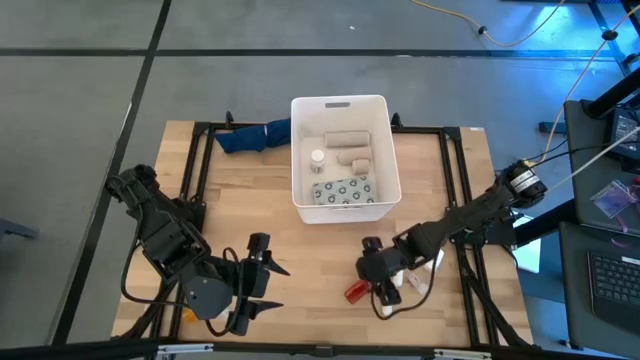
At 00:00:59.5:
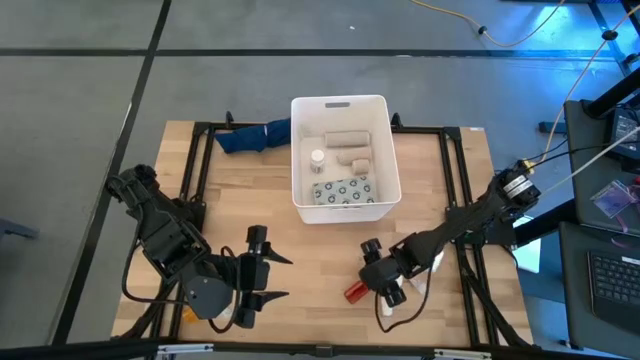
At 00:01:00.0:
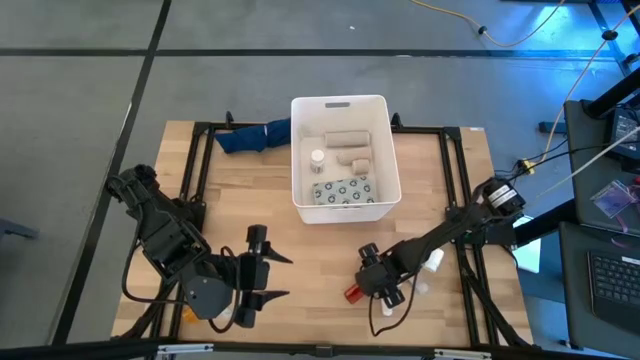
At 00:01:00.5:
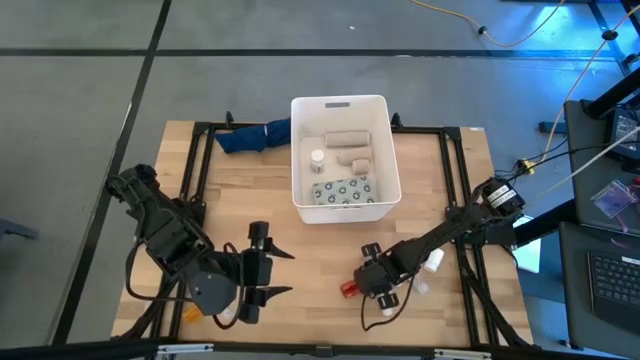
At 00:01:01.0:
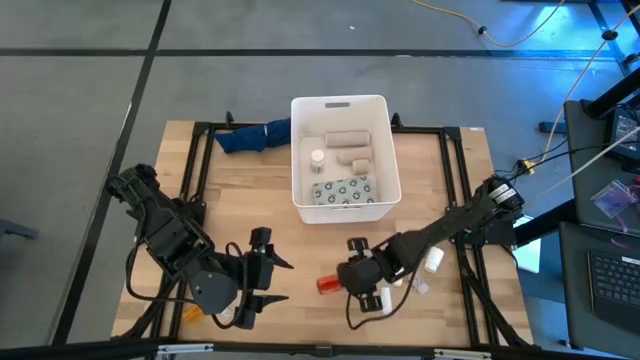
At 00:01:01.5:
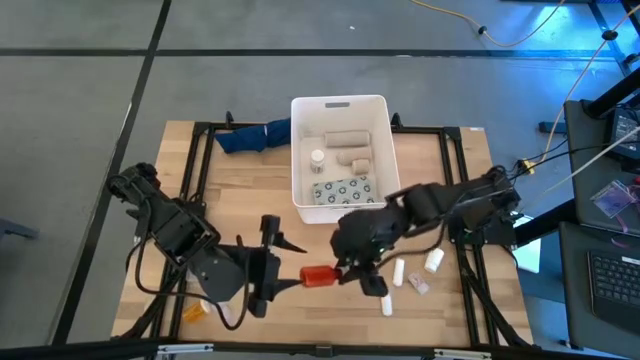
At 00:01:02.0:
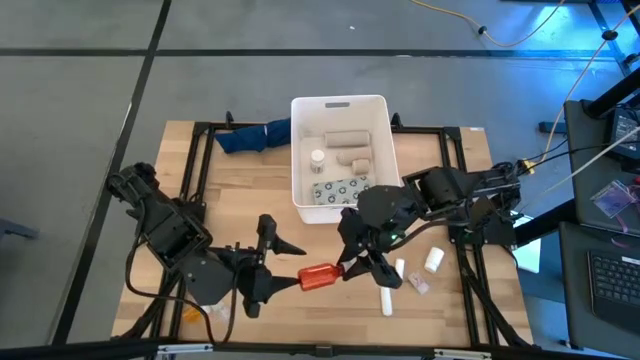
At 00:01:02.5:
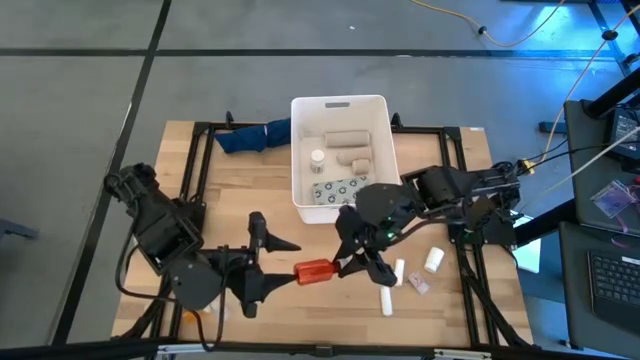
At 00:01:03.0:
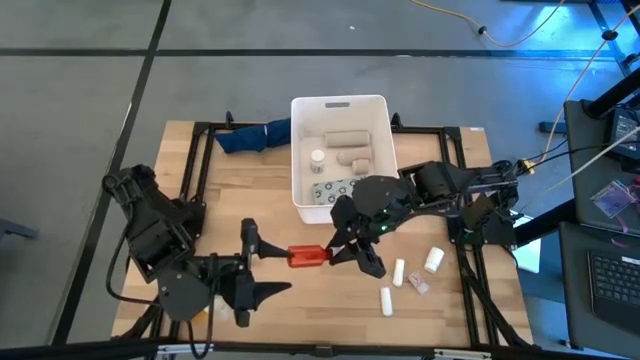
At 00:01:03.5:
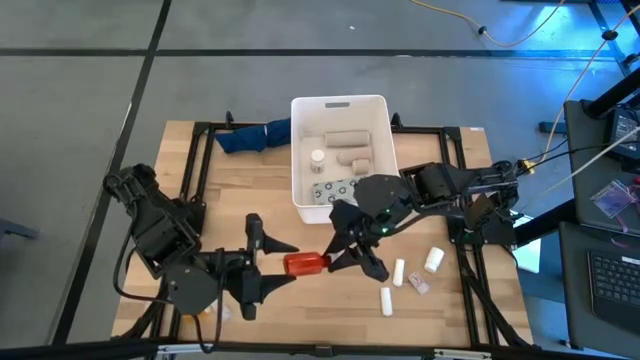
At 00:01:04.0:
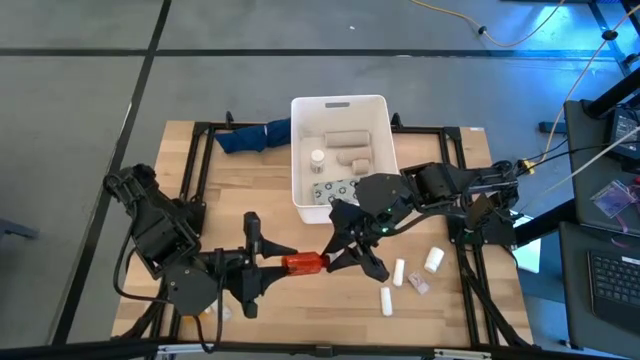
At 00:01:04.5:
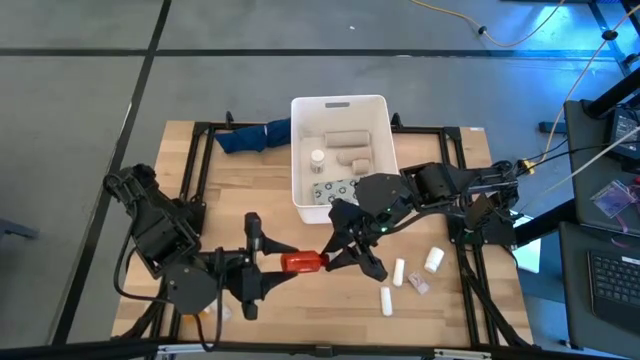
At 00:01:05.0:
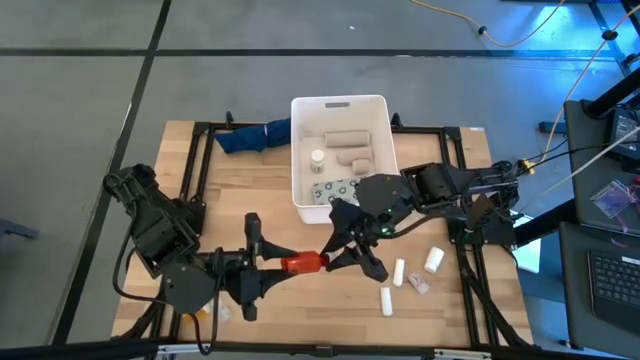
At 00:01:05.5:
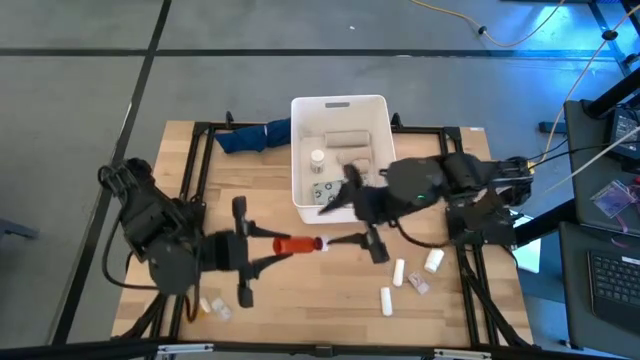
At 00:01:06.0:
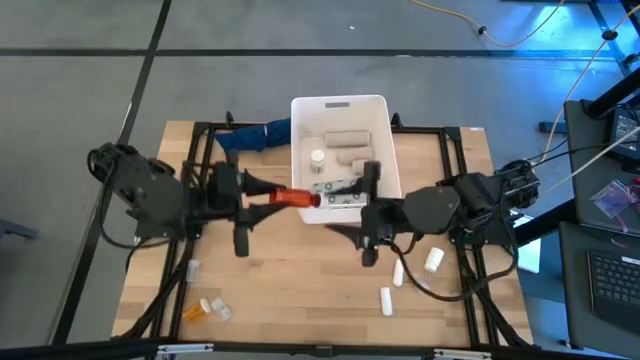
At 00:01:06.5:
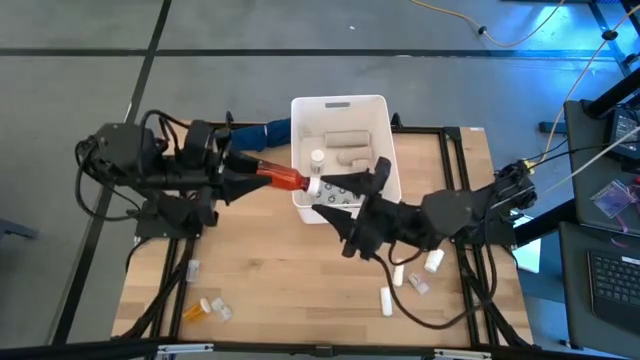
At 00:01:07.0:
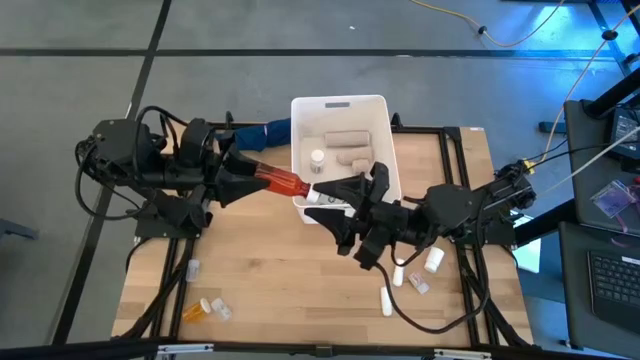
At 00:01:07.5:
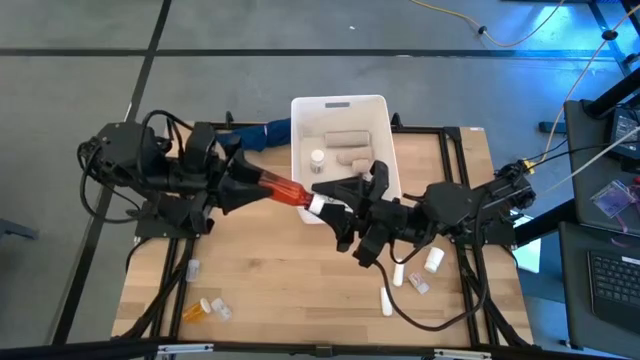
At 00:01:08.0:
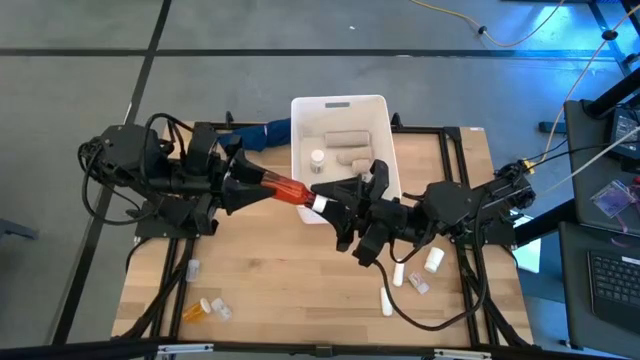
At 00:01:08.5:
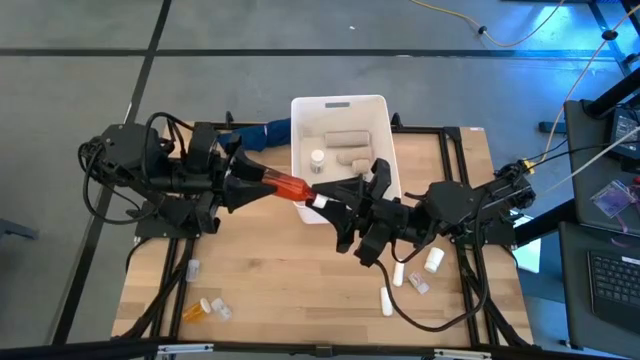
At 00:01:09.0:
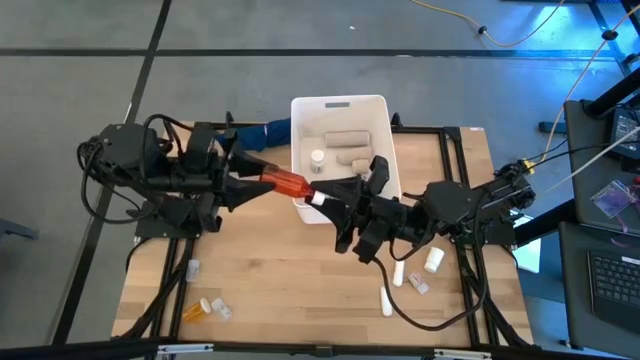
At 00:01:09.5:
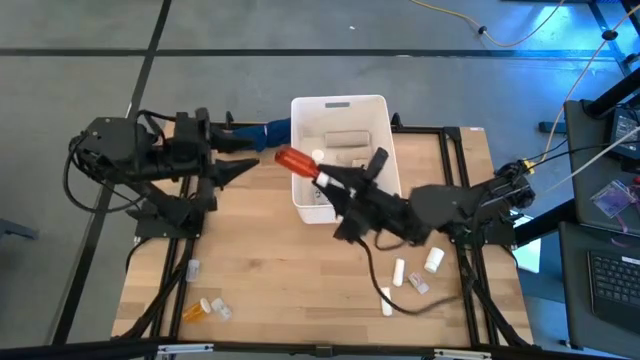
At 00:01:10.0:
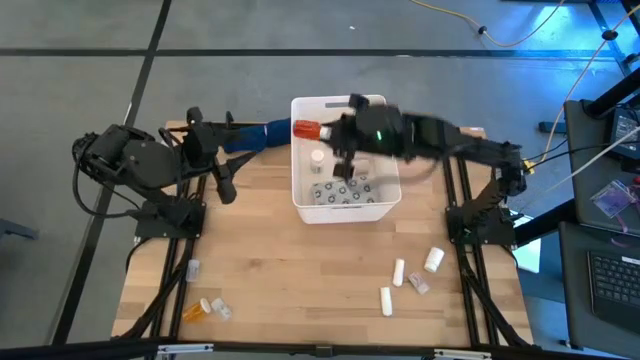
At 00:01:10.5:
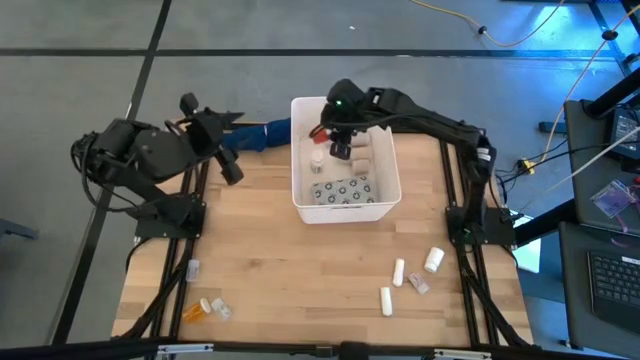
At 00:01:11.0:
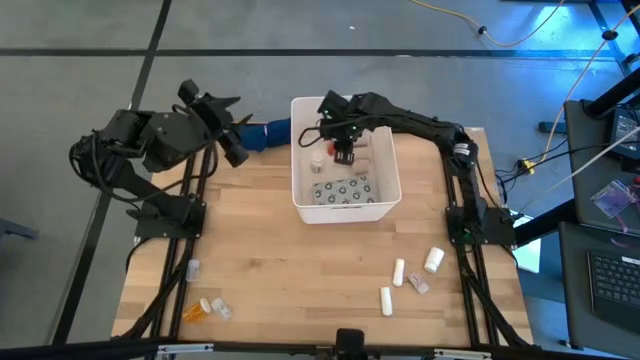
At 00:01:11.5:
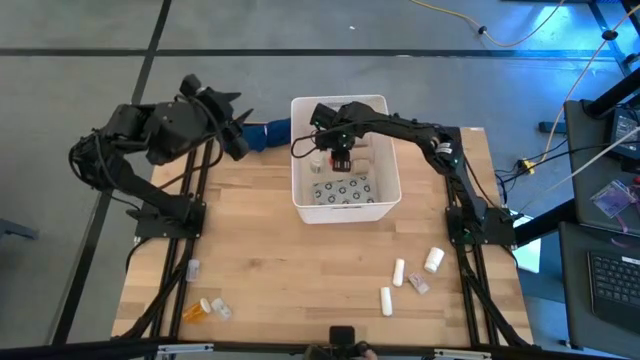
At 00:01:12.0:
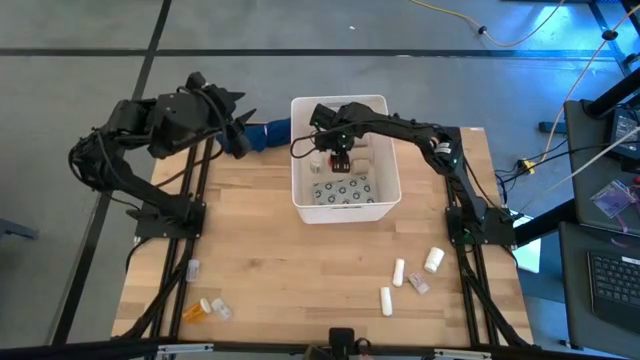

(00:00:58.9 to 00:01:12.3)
Task: Pick & place medical supplies in basket/bin
Put the red medicine bottle into the bin
